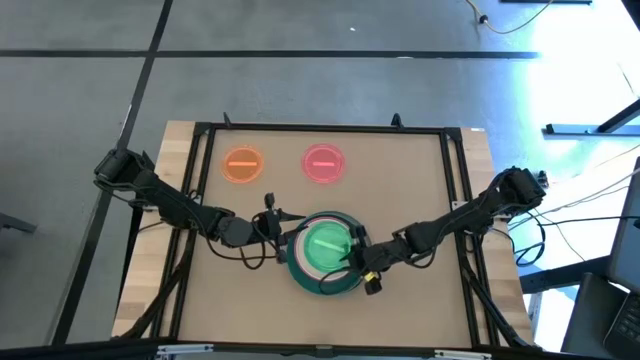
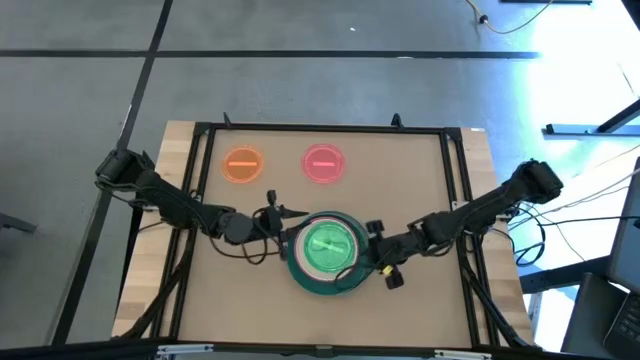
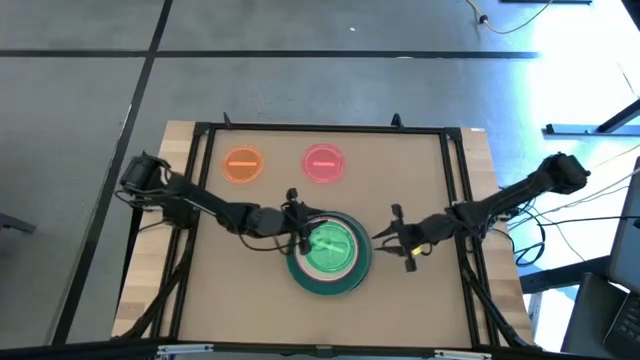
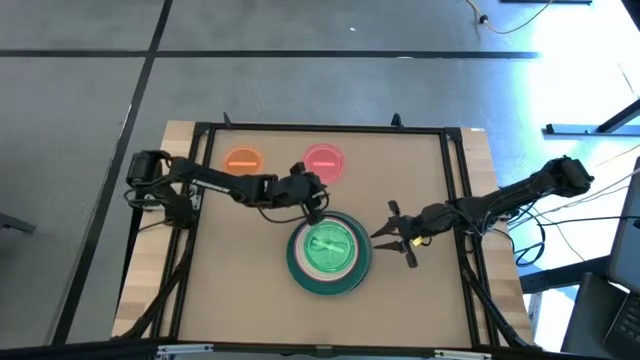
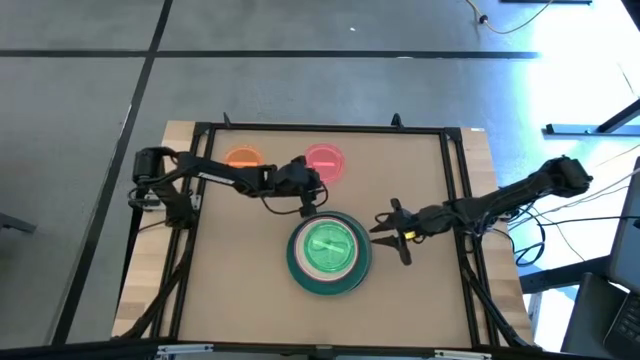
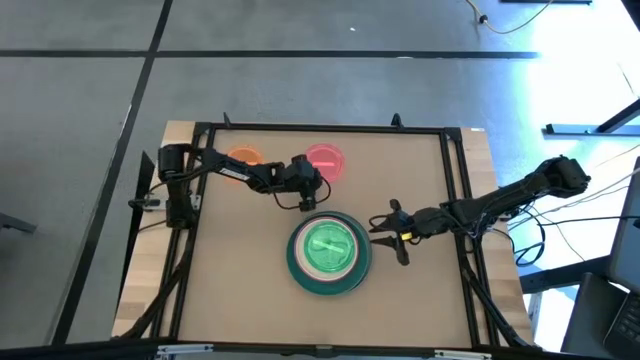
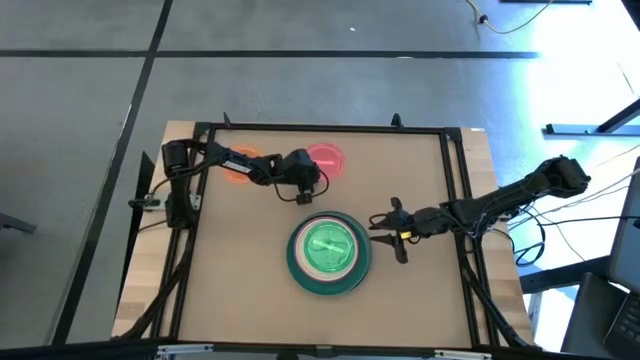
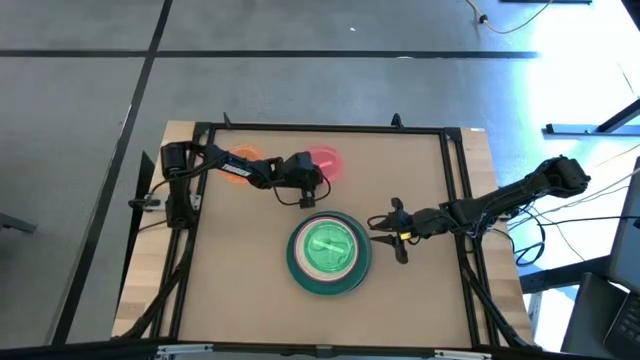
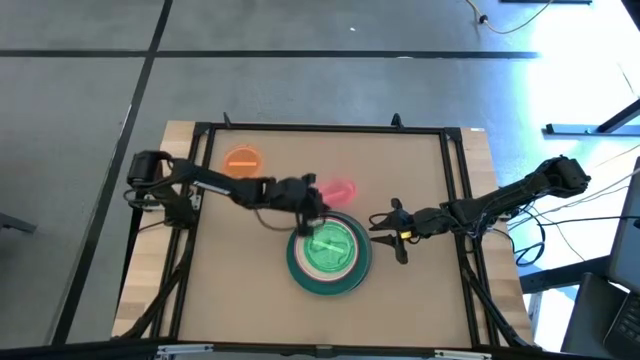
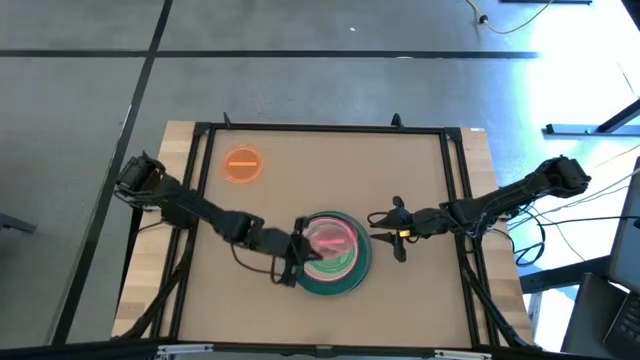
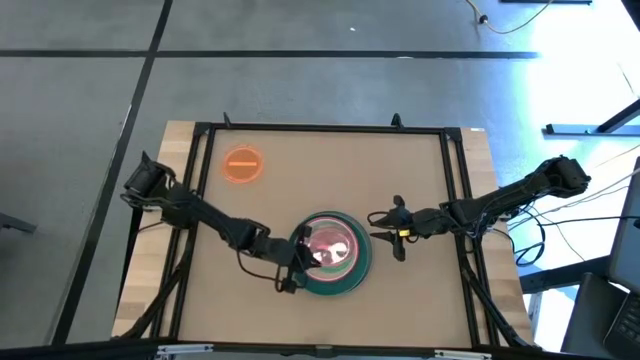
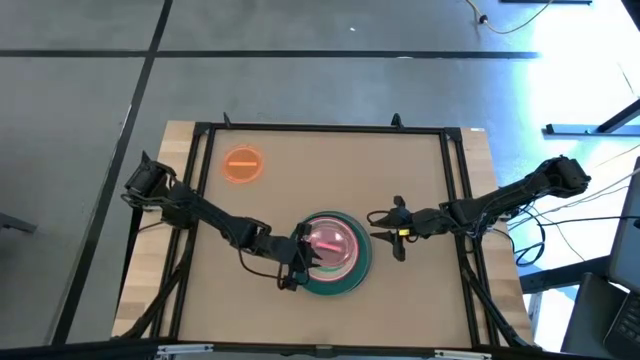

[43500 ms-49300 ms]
Task: Stack plastic plates
Stack the transparent pink plate on top of the light green plate

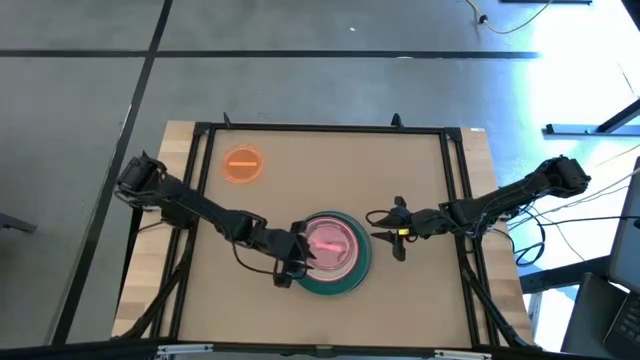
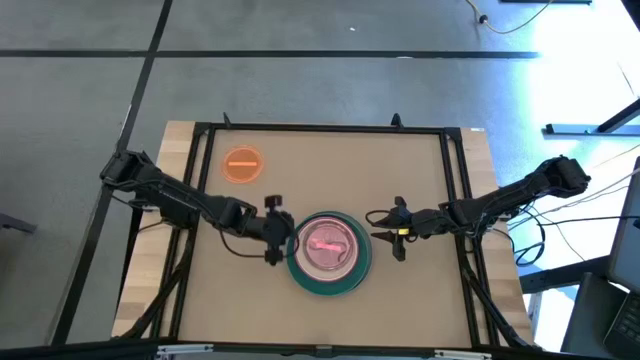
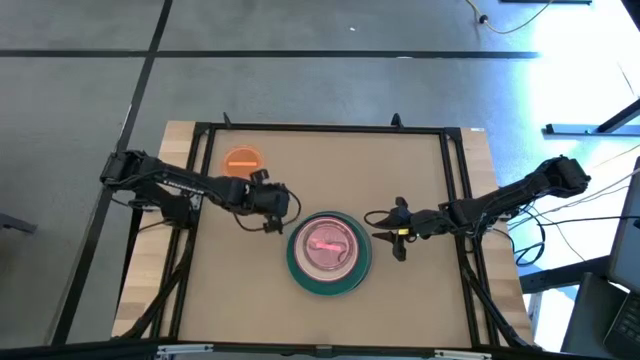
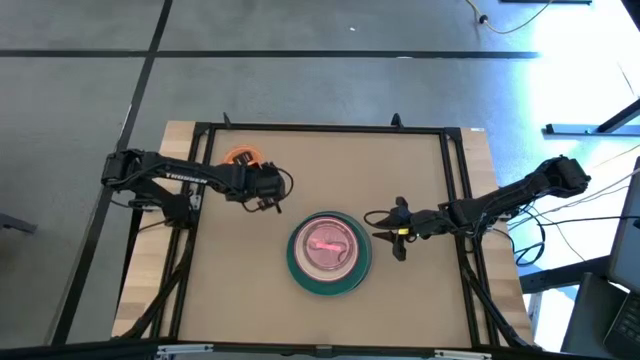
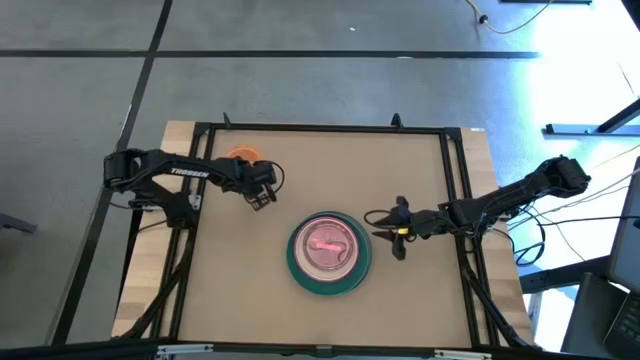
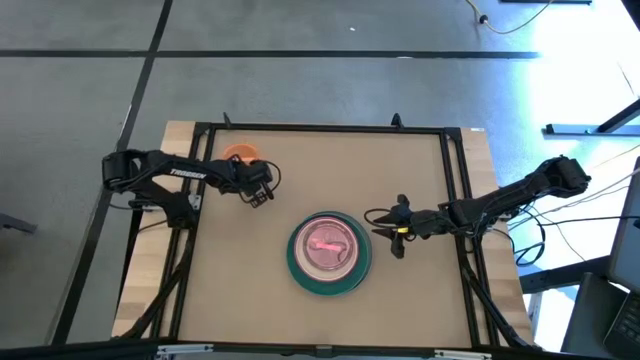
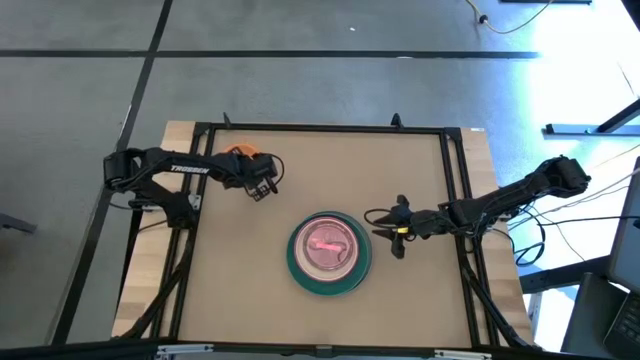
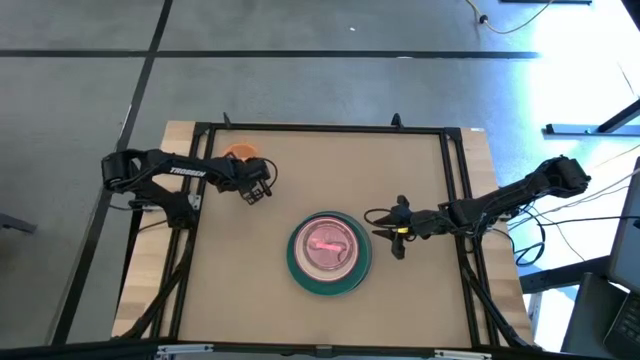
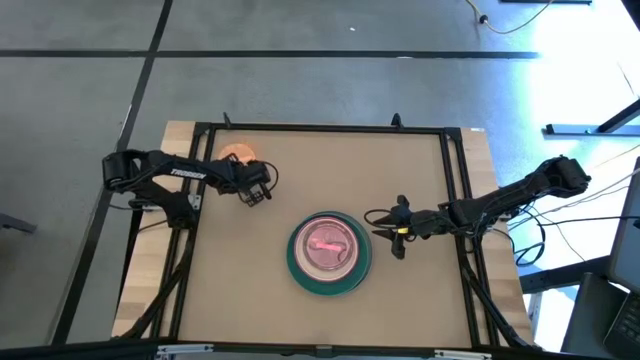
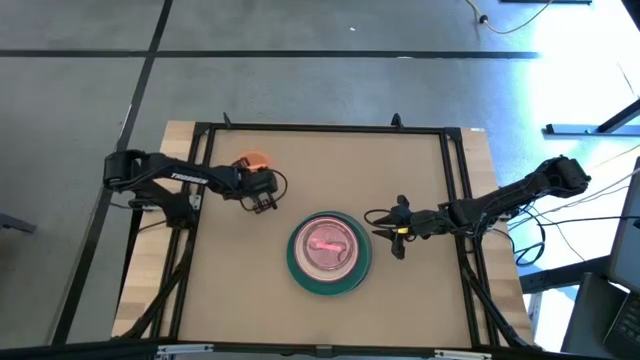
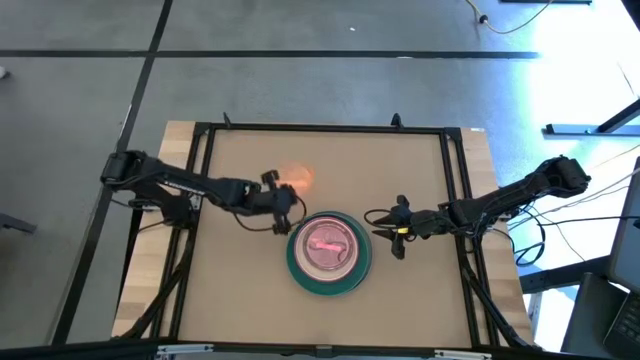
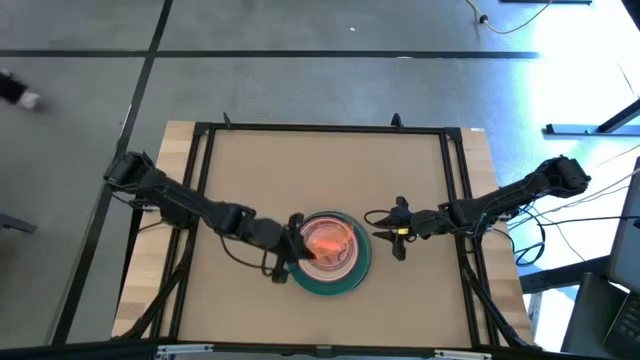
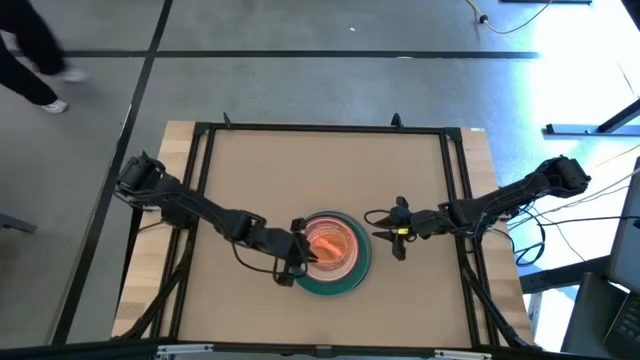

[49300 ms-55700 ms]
Stack the transparent orange plate on top of the light pink plate

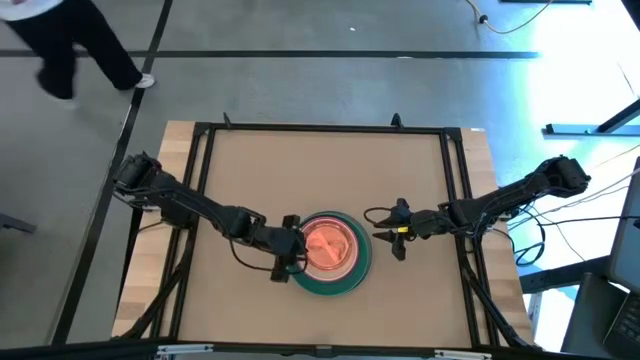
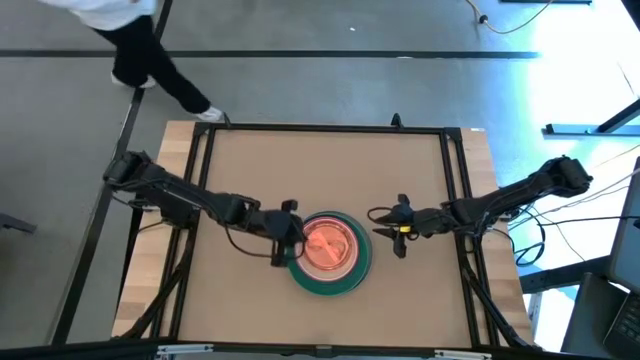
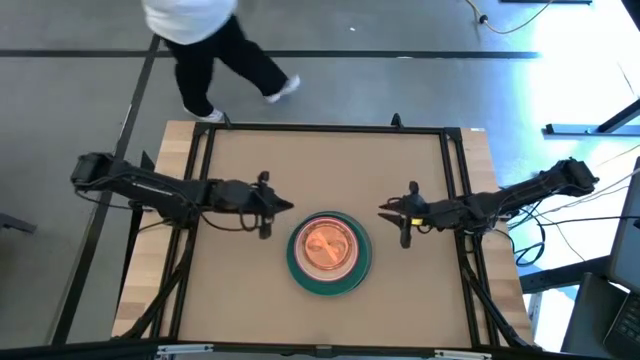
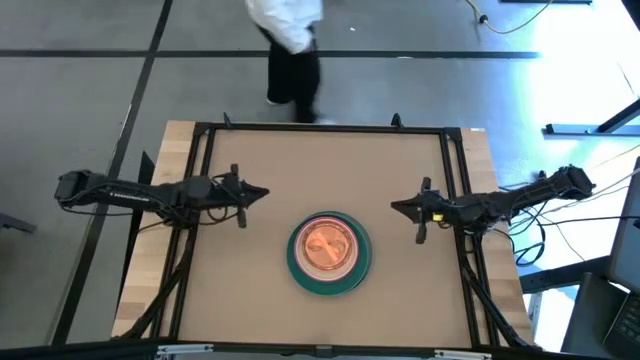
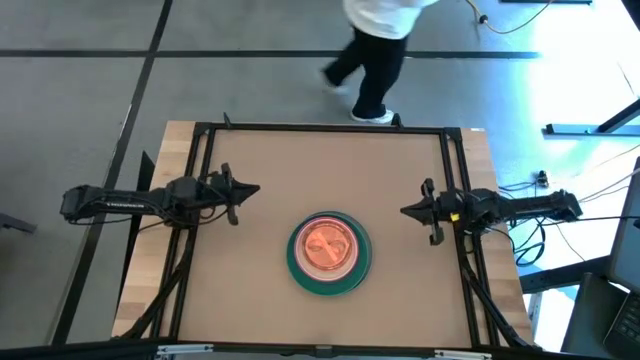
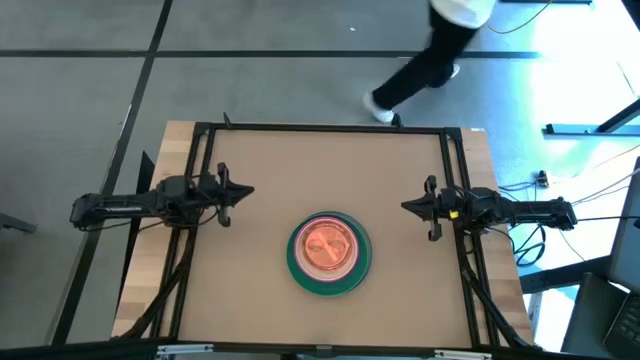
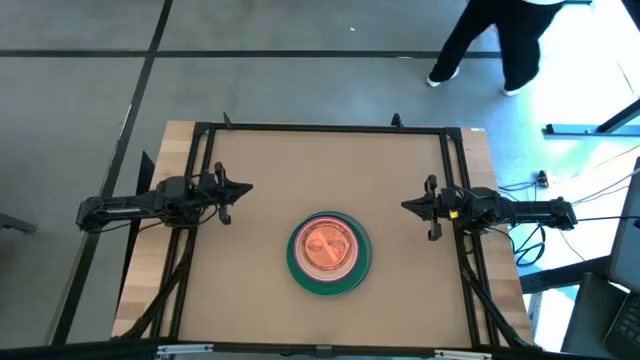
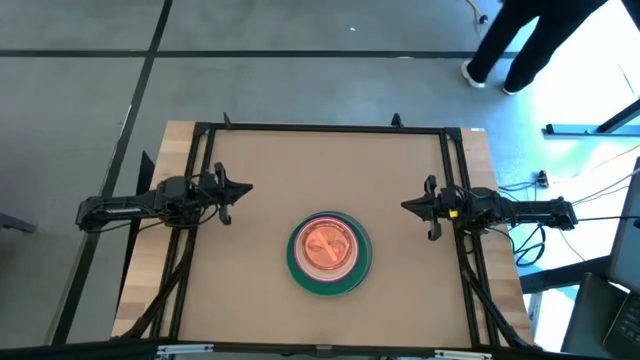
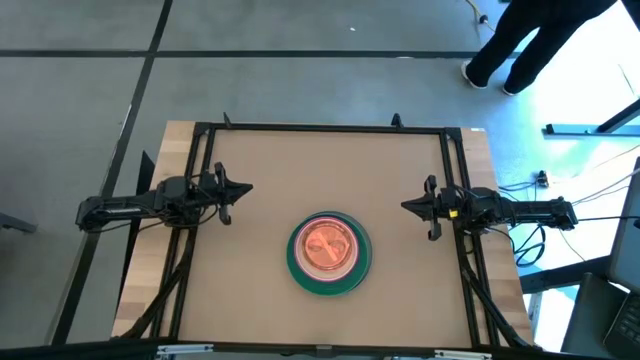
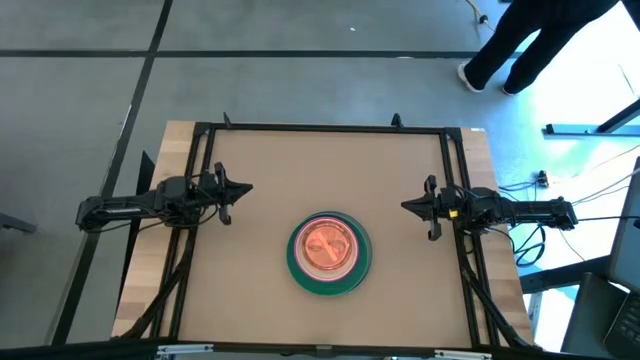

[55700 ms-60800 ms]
Return to Home Position

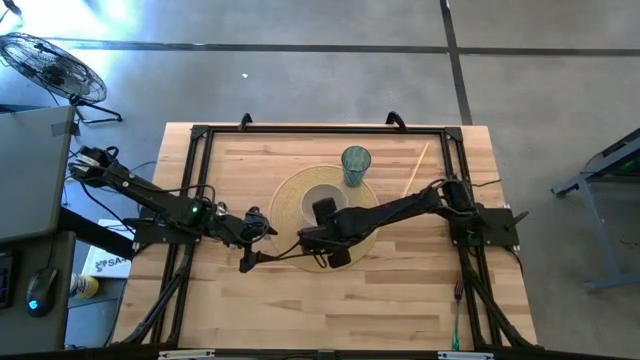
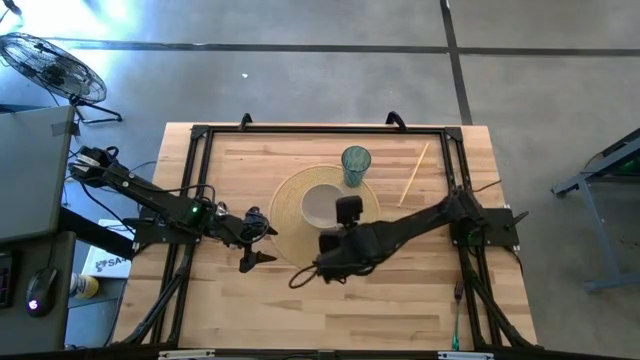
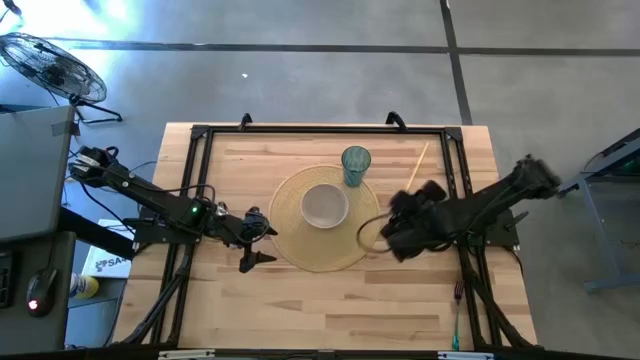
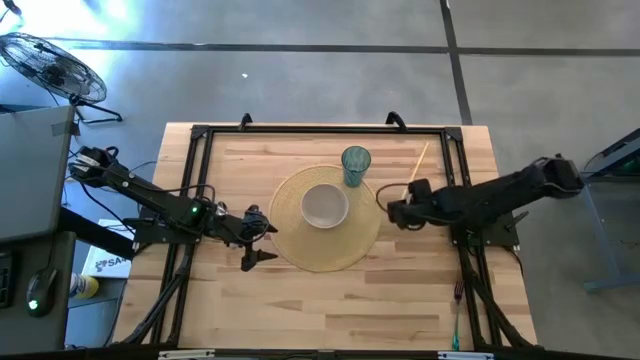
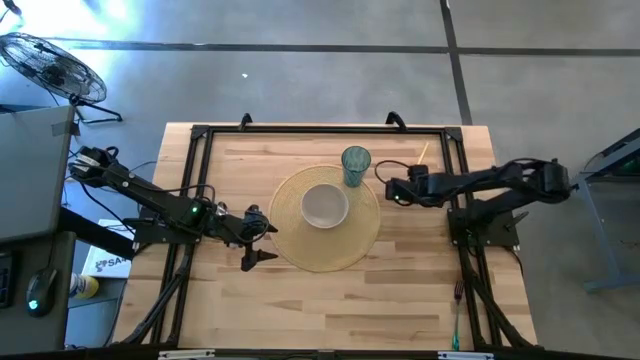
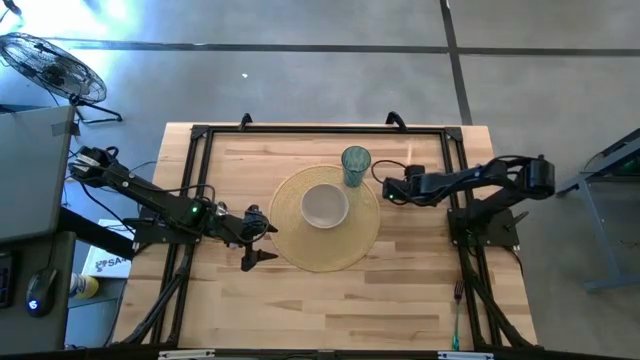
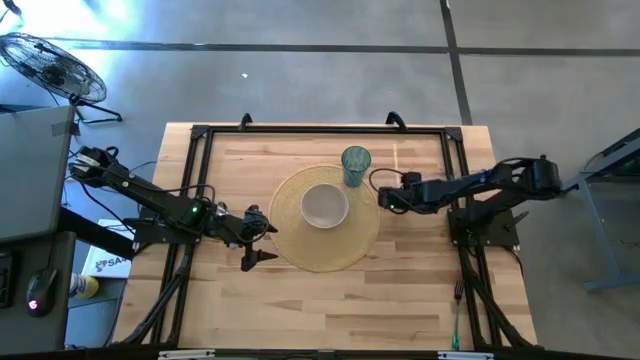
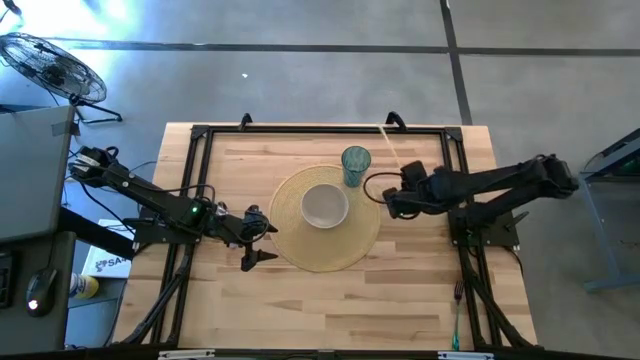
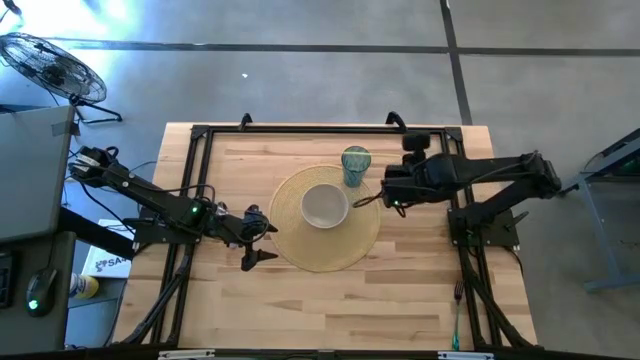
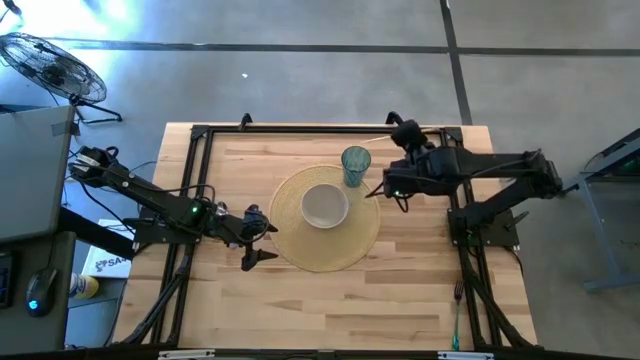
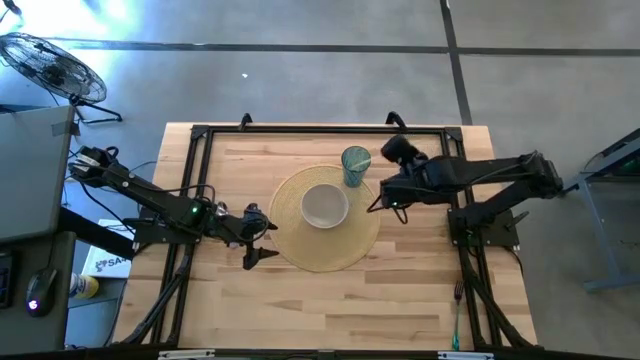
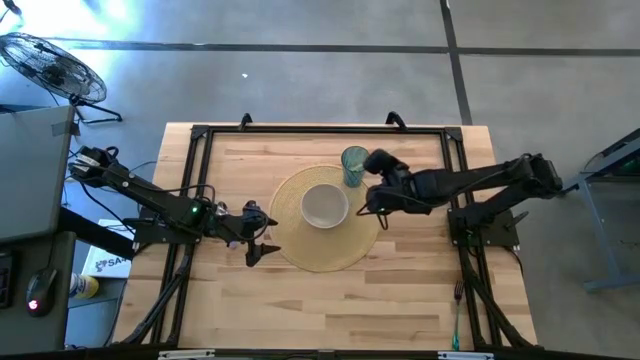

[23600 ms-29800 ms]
Task: Pick & Place Utensil
Insert the yellow straw into the blue cup
